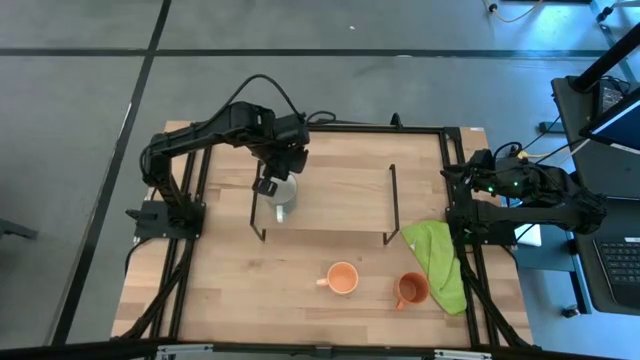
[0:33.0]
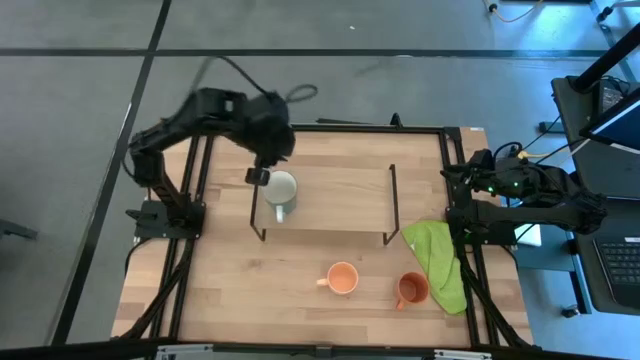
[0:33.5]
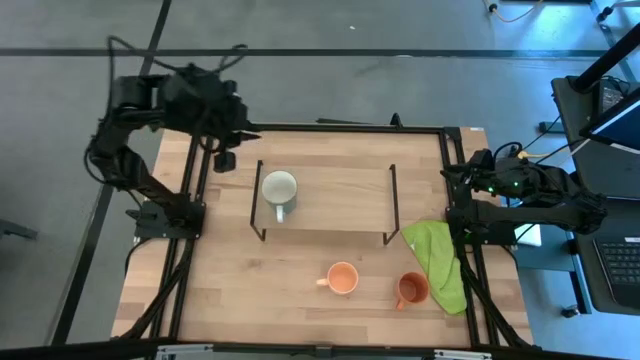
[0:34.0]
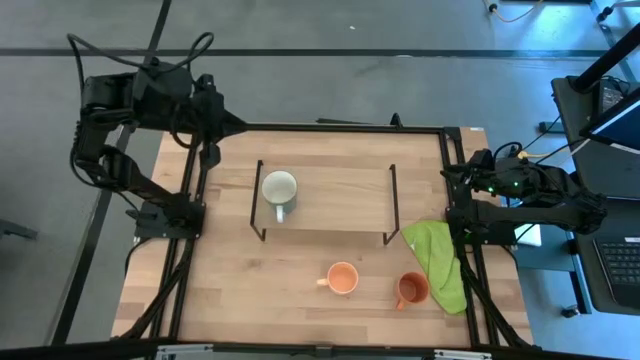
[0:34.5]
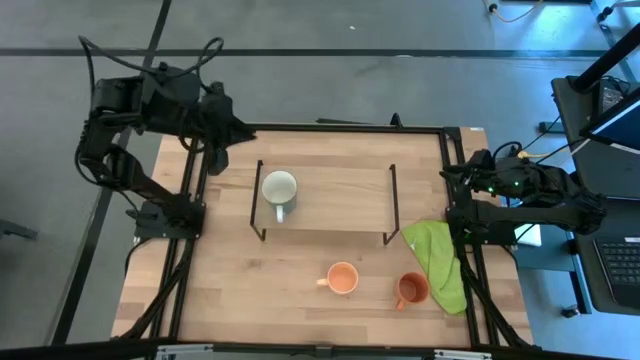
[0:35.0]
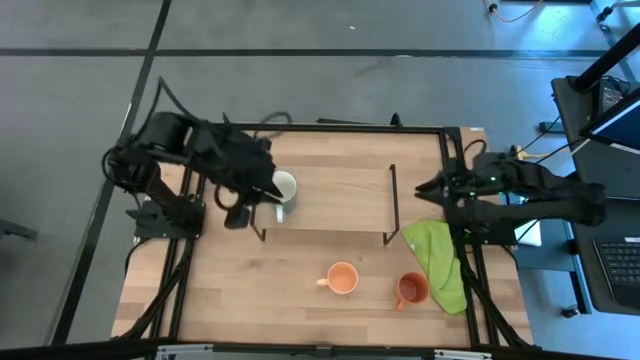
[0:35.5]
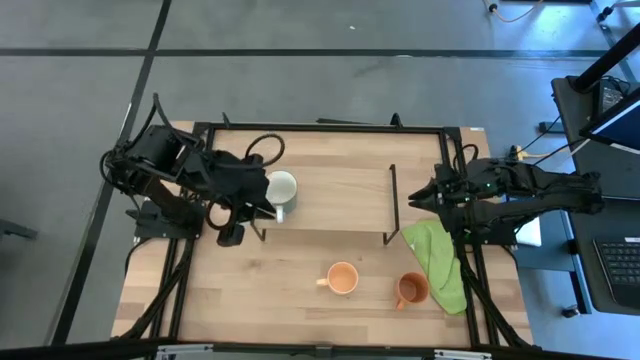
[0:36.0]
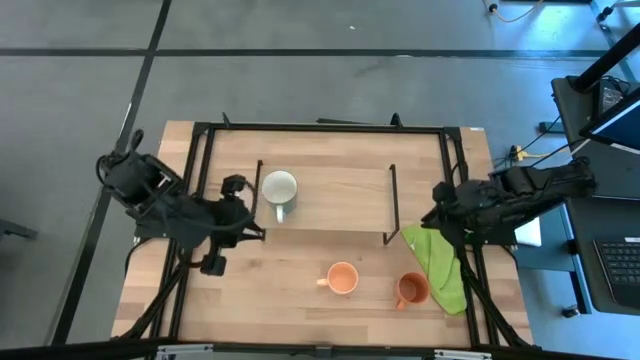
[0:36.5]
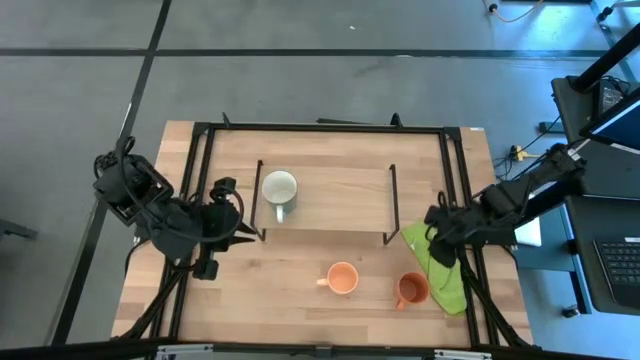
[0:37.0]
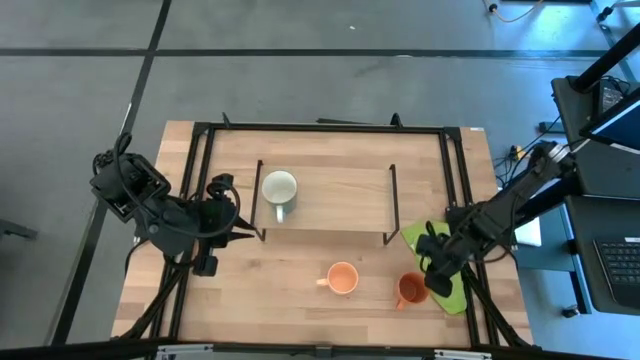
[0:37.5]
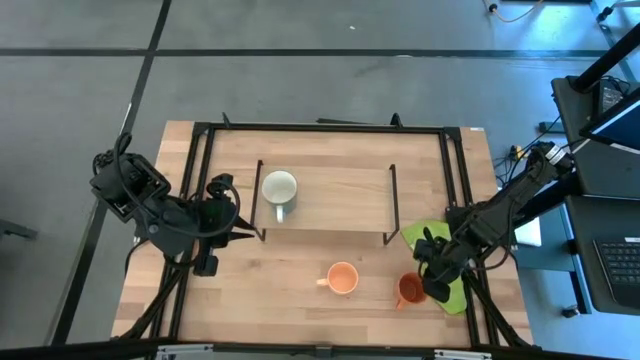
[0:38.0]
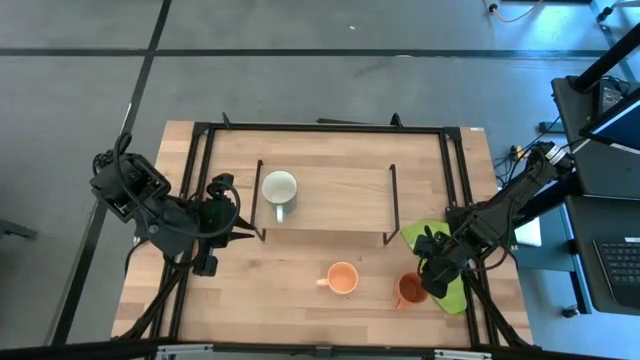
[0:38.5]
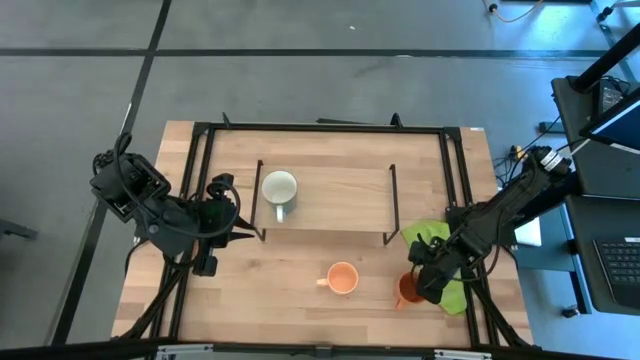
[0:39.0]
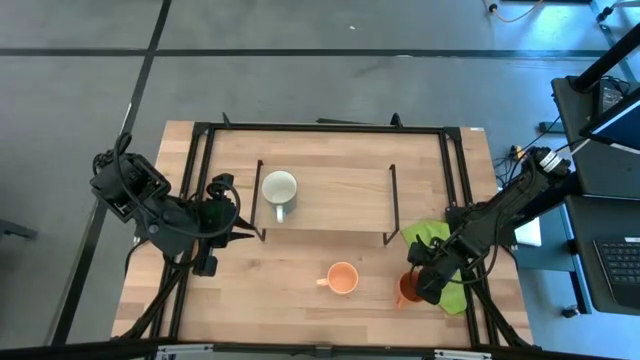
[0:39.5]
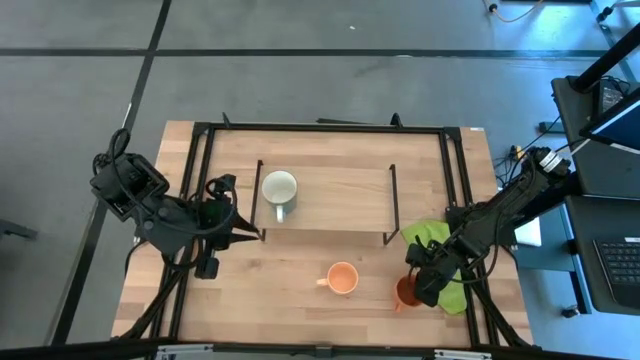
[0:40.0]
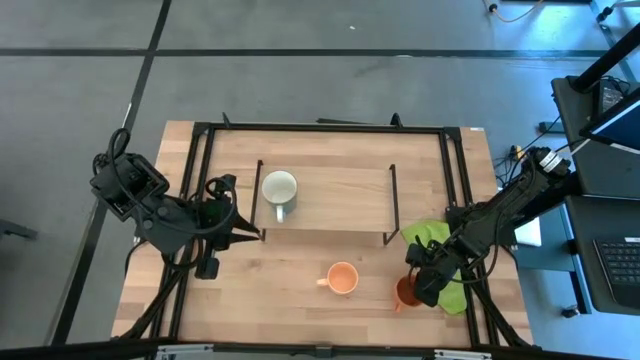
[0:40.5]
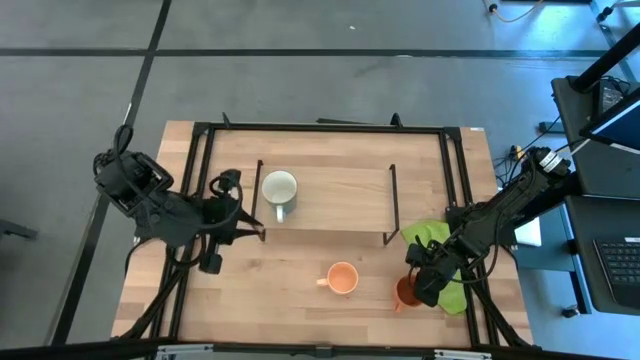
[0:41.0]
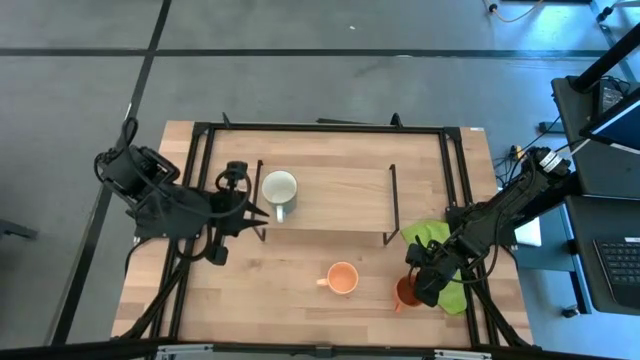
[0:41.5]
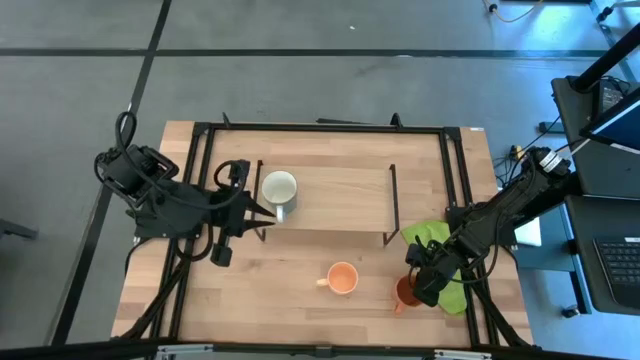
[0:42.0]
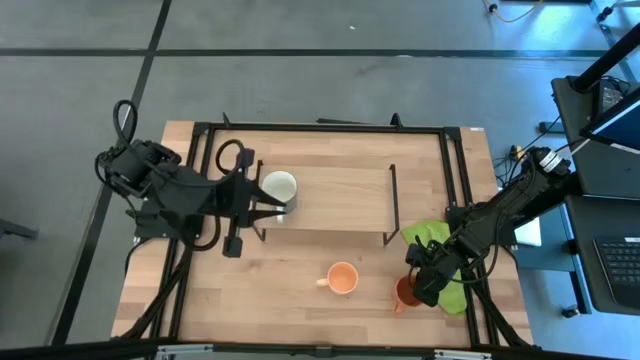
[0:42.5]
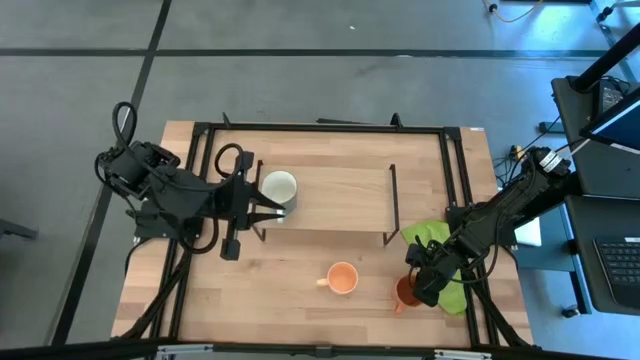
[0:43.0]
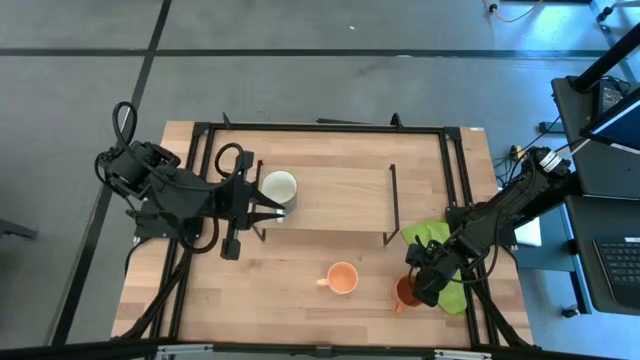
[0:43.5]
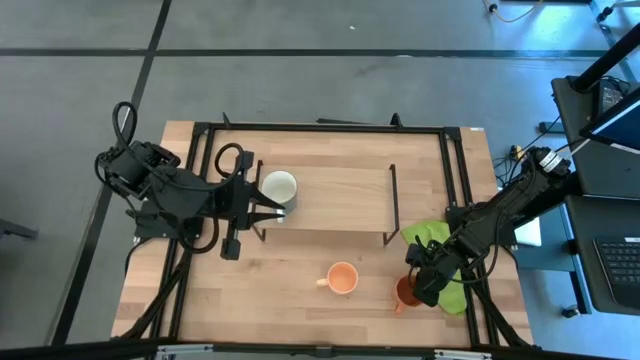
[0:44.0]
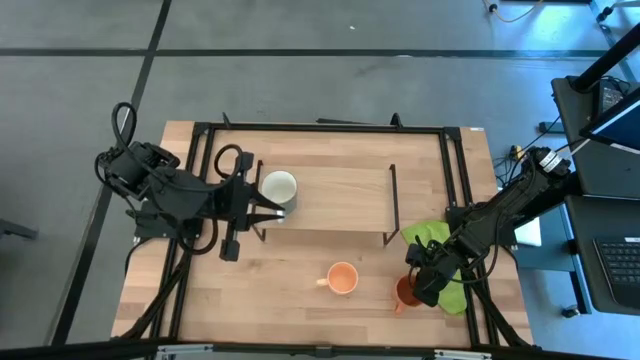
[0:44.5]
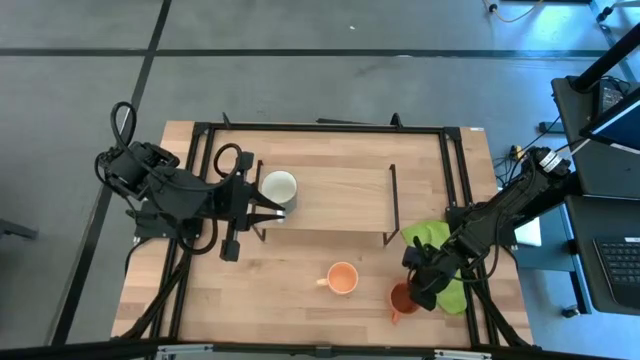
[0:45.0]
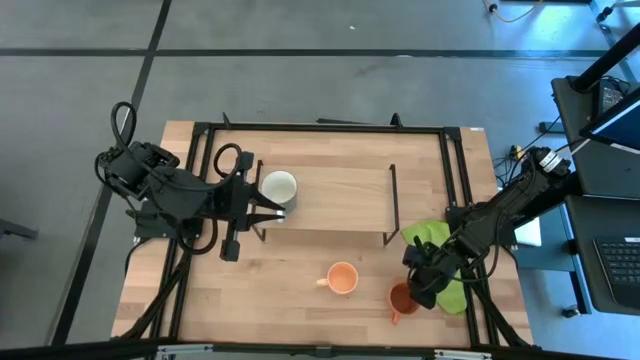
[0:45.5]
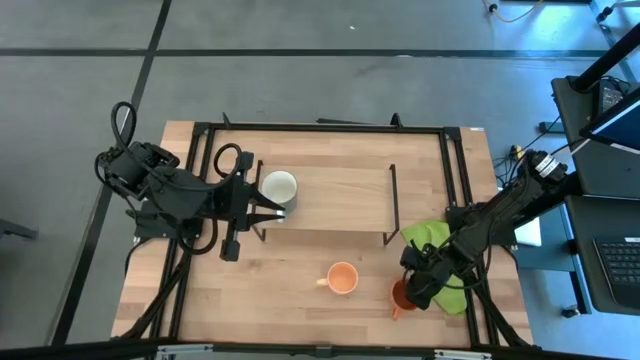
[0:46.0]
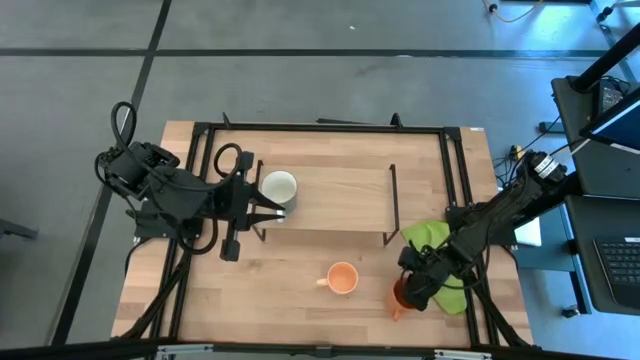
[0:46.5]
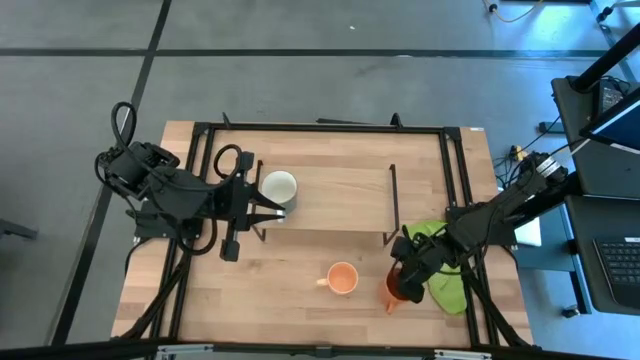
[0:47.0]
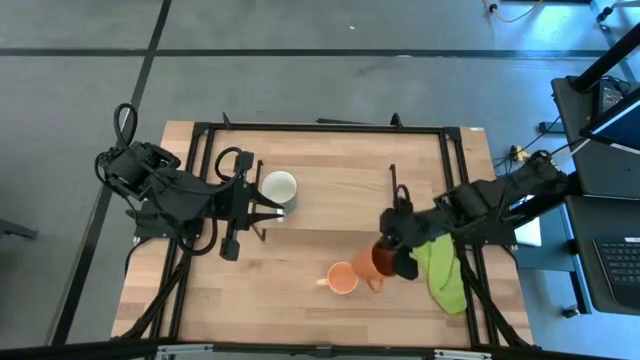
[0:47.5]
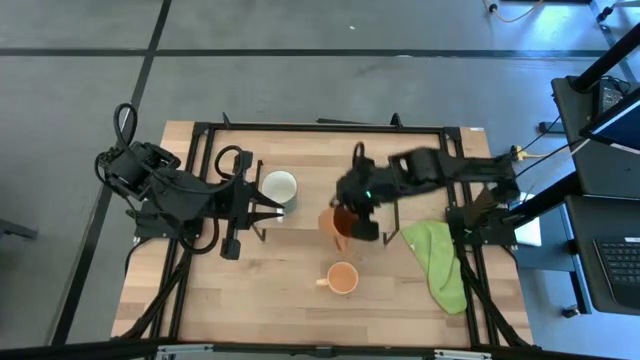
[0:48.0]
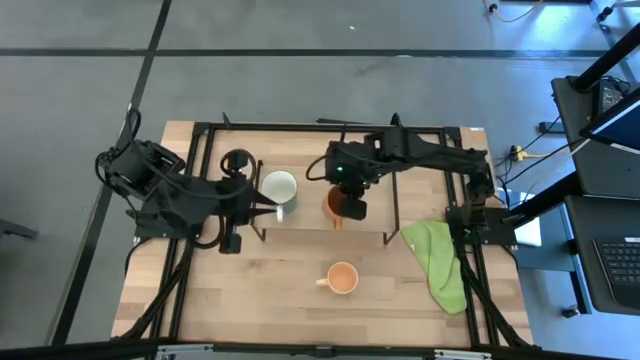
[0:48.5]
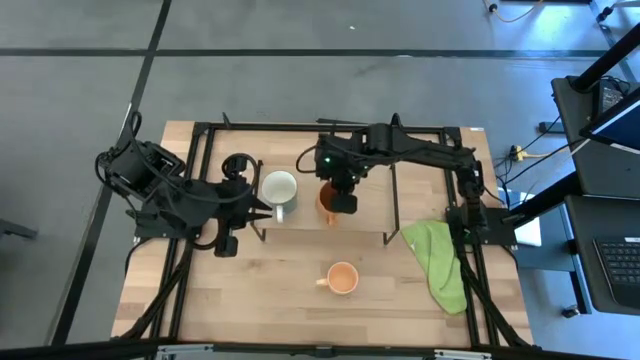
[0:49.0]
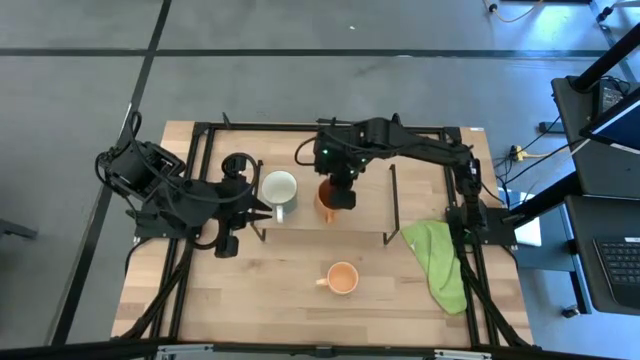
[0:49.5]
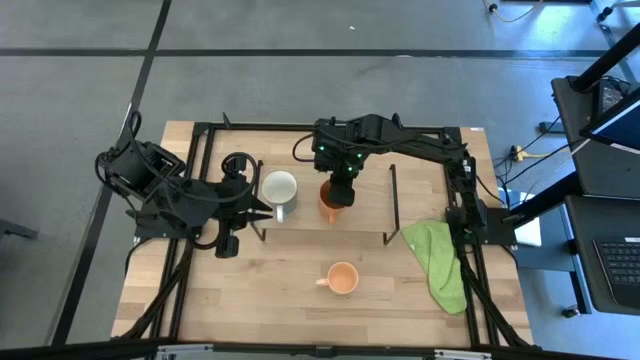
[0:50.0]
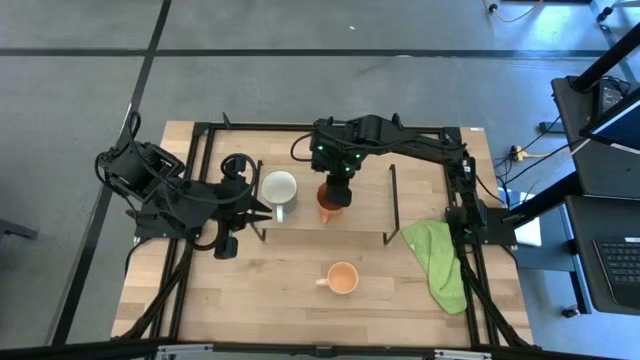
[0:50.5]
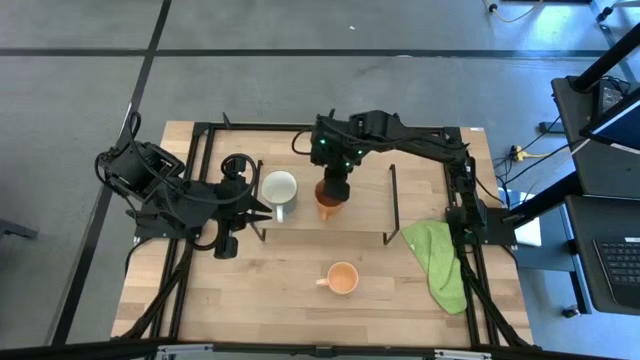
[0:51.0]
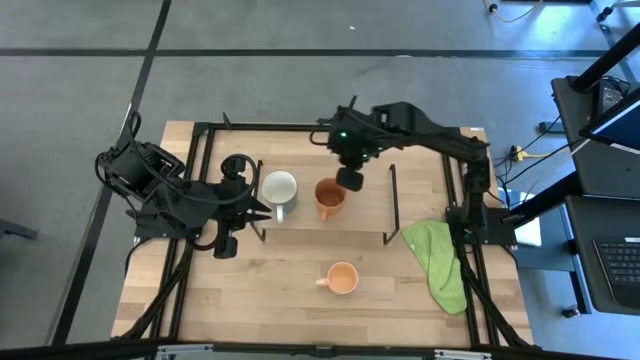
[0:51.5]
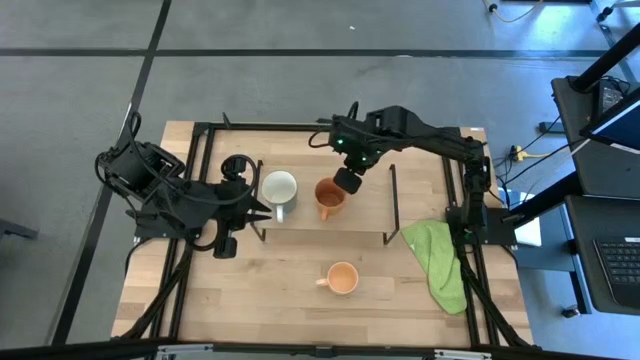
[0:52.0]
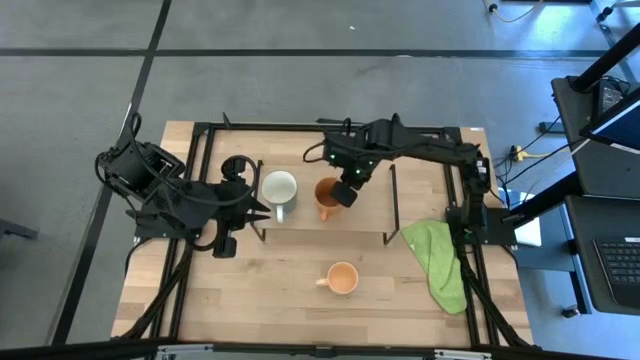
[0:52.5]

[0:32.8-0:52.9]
Task: Stack small to large cups/mugs on shelf
Put the orange mug on the shelf
